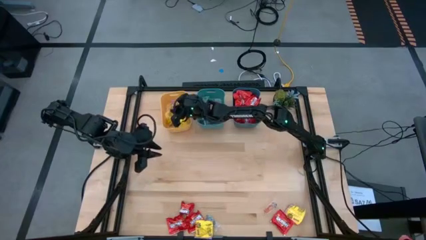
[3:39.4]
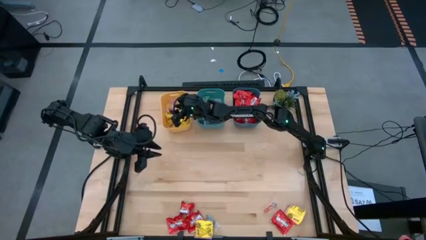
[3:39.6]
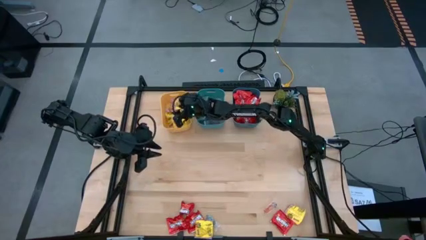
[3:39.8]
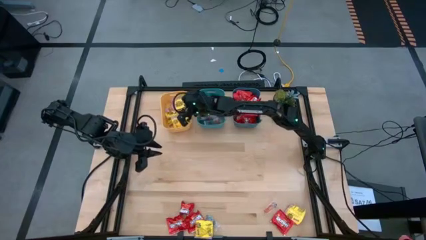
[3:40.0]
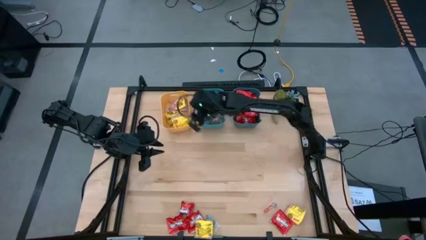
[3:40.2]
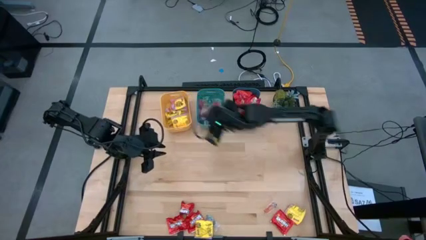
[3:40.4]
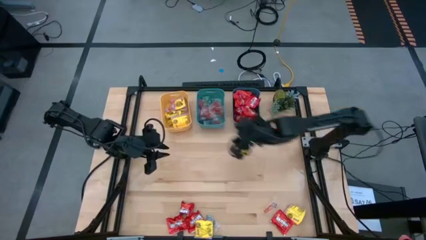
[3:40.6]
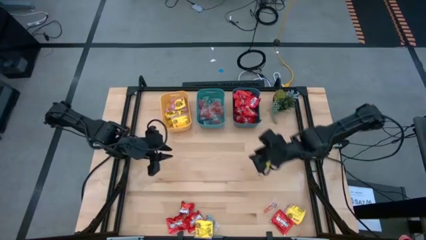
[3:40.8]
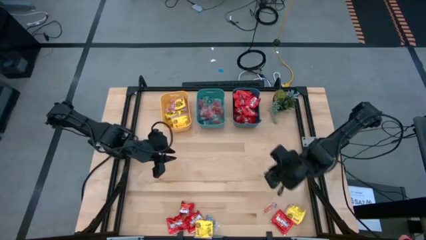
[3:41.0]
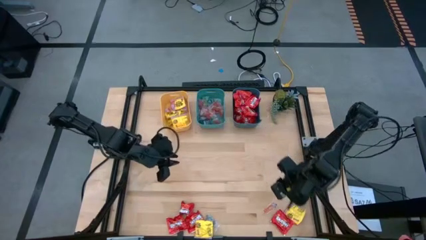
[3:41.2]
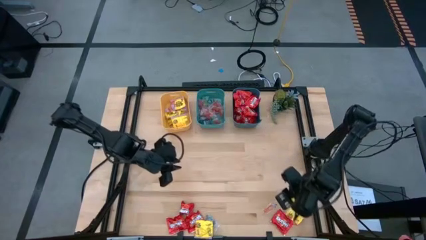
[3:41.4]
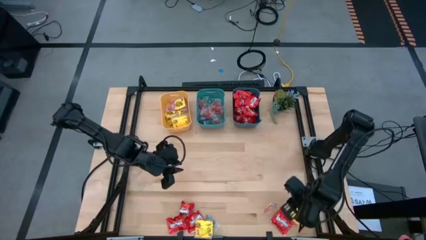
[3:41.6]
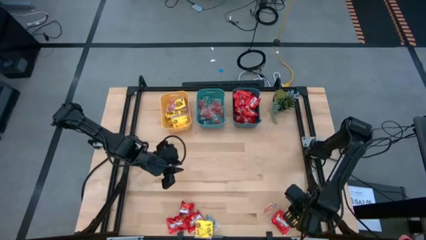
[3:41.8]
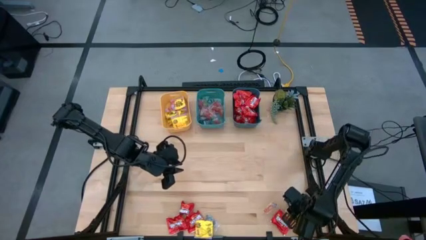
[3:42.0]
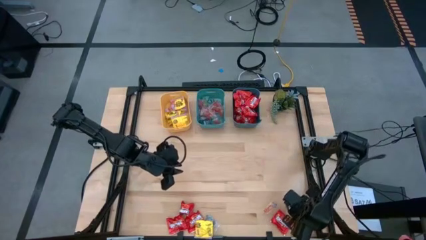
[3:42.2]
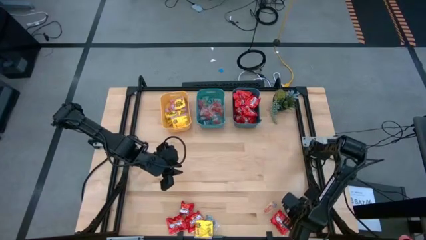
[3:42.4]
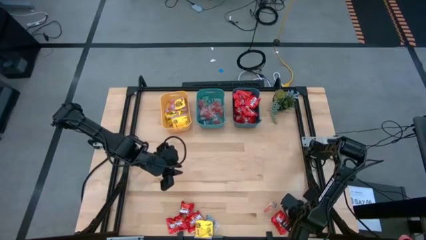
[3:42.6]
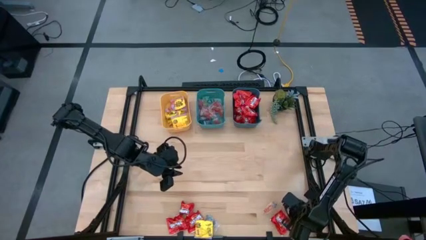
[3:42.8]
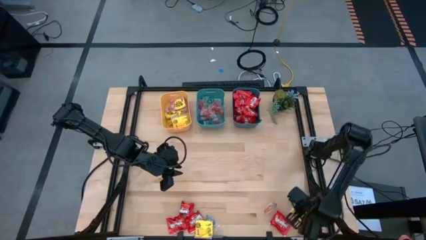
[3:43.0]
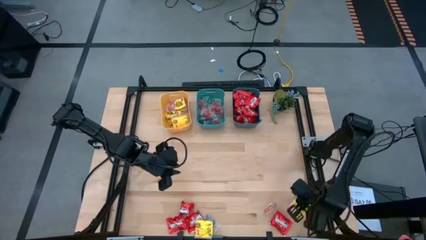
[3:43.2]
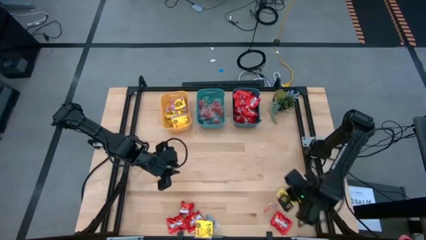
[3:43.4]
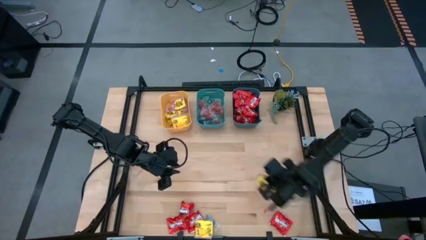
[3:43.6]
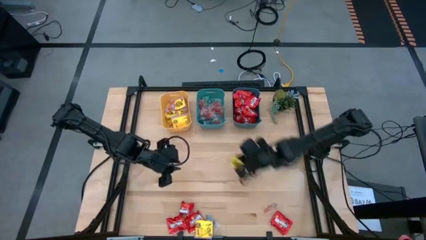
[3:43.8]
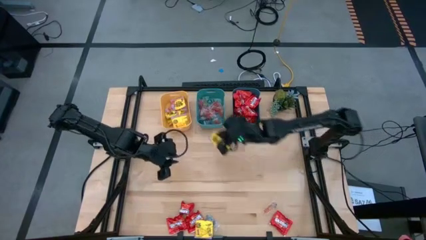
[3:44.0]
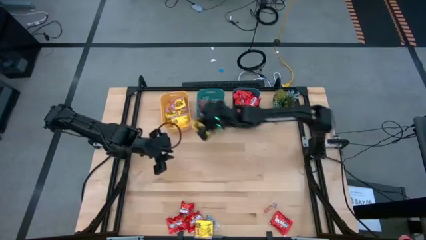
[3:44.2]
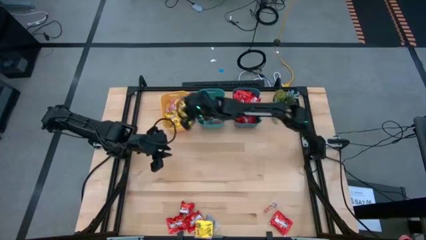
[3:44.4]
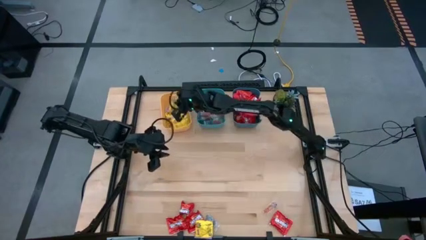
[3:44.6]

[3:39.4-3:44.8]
Task: Sort candy
Put the yellow candy into the yellow bin

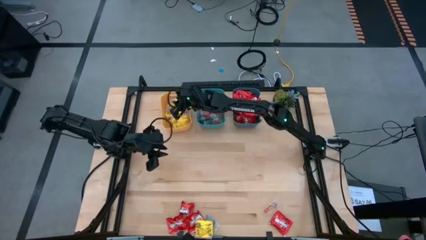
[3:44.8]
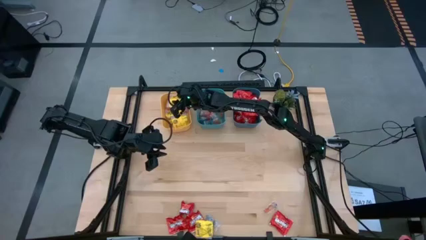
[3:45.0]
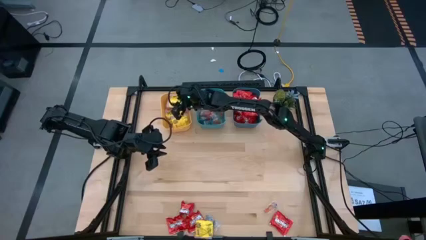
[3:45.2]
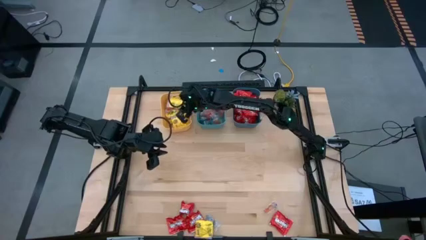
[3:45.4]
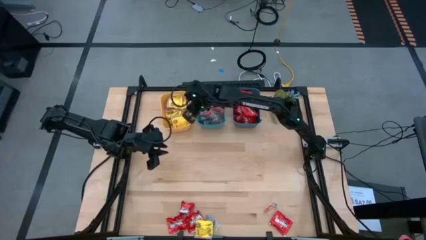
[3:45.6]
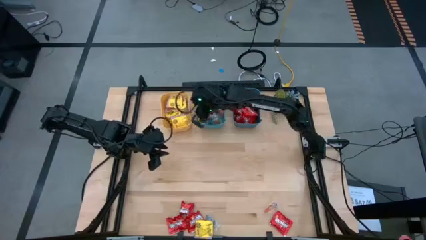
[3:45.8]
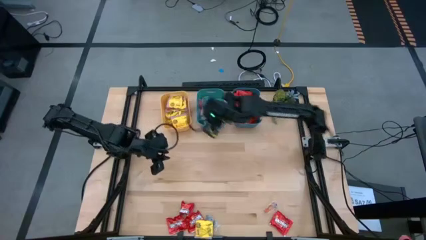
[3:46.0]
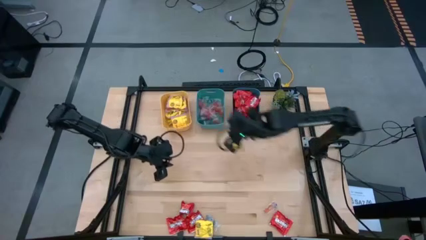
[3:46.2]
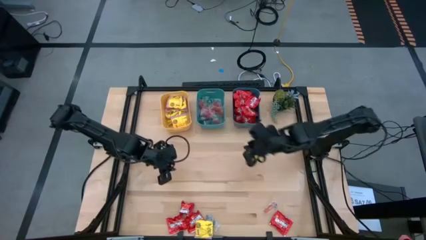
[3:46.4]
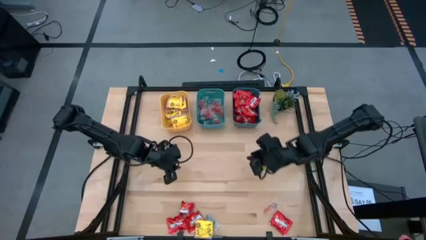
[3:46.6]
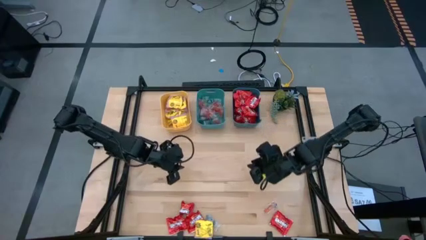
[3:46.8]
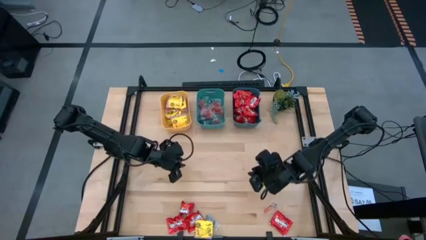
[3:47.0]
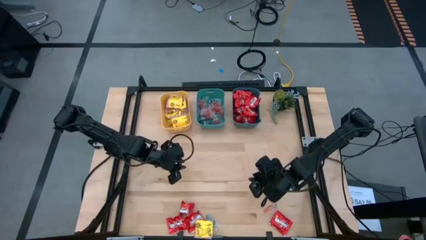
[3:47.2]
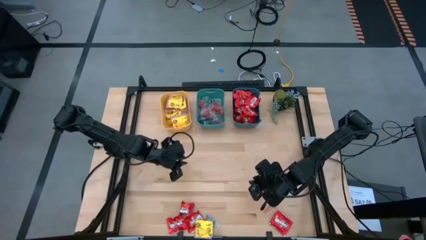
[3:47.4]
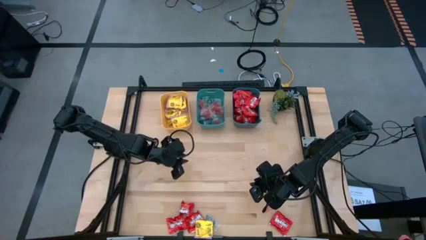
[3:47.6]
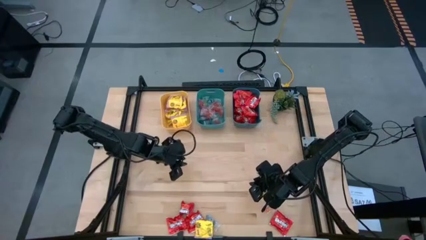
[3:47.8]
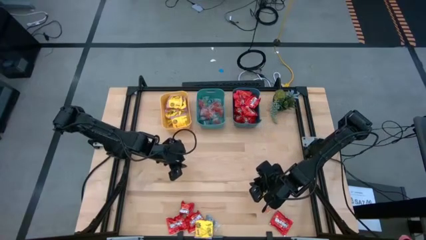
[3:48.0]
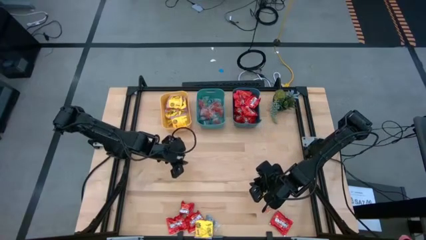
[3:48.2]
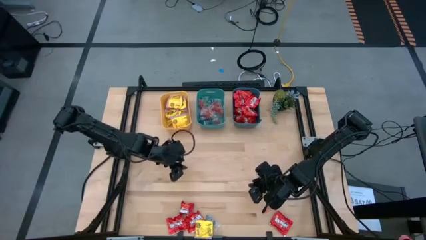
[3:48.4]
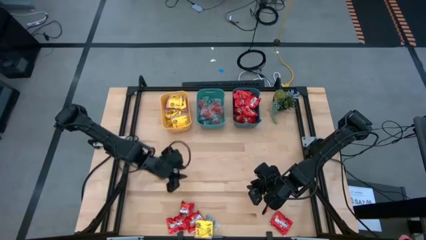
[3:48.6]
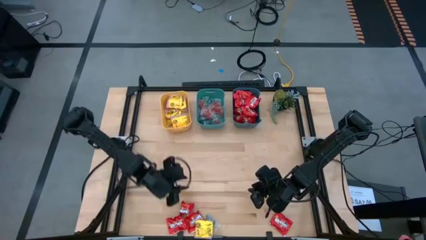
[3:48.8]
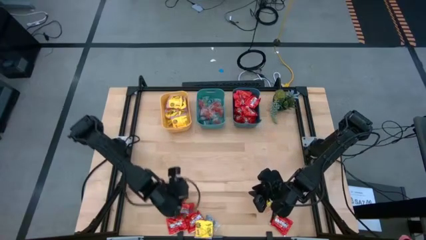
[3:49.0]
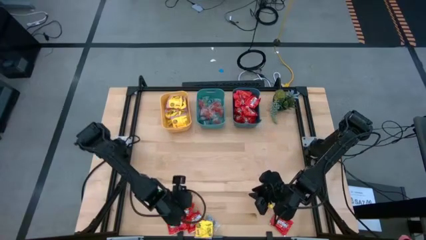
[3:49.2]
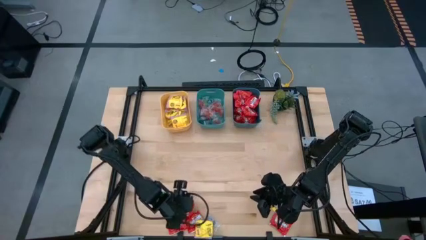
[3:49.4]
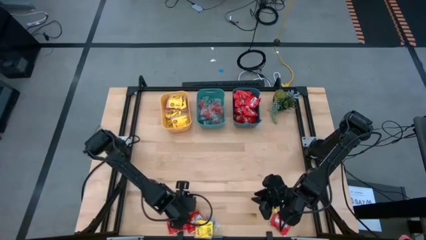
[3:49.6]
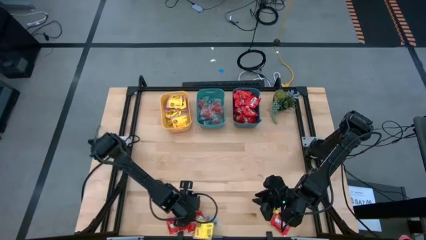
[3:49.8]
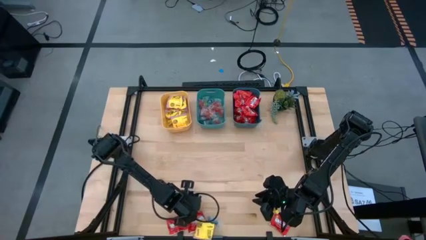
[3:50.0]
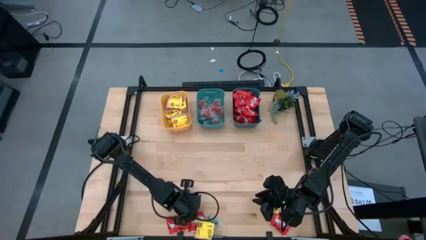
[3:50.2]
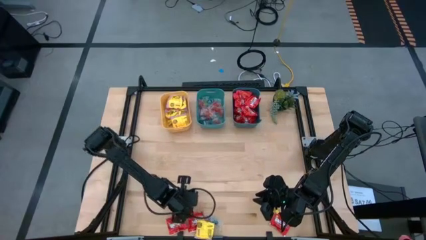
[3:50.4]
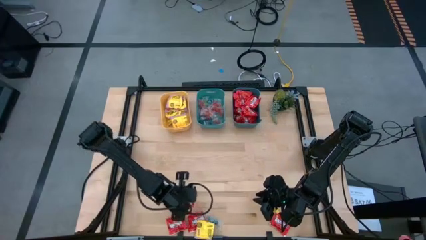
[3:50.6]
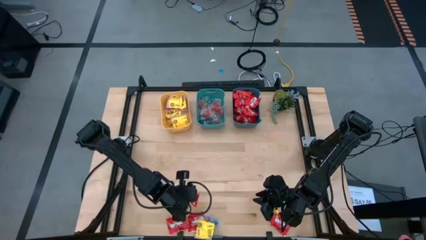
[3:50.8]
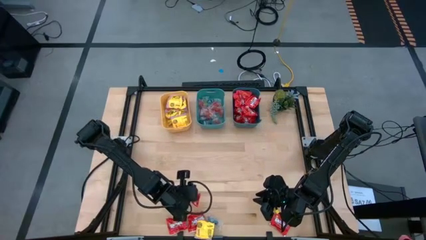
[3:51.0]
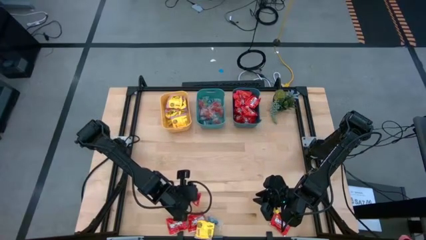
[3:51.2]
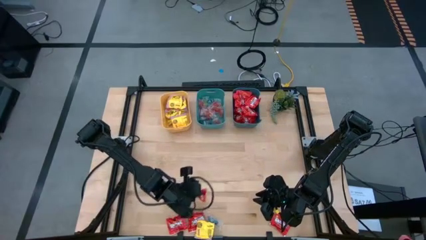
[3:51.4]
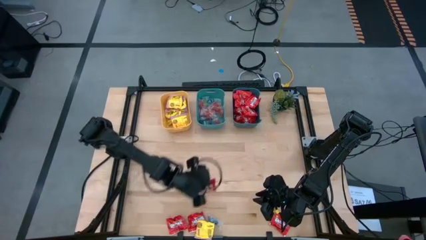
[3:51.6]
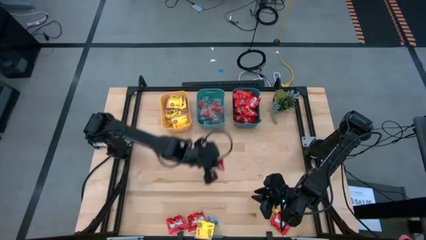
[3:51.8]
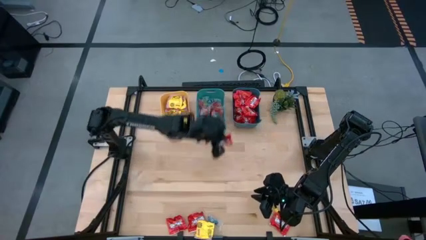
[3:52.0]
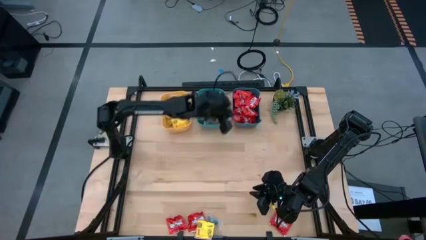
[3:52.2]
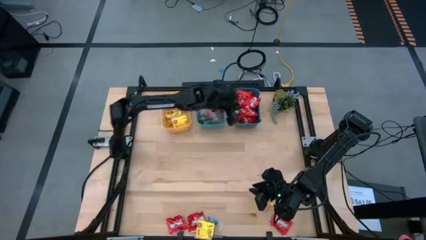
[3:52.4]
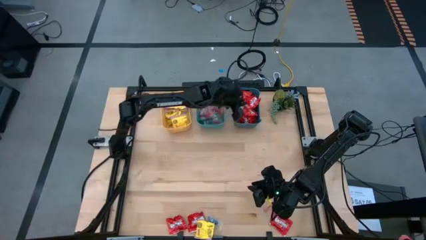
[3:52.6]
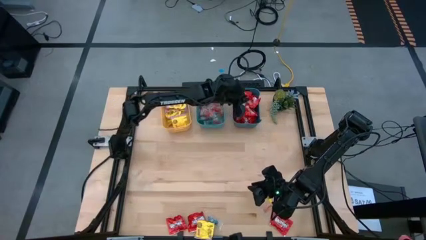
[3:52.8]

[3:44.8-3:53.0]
Put the red candy into the blue bin

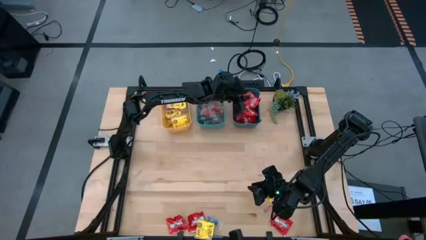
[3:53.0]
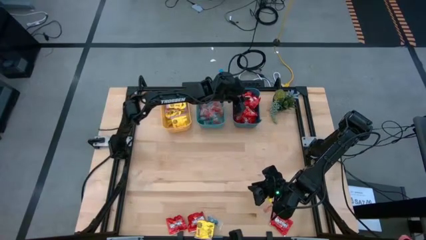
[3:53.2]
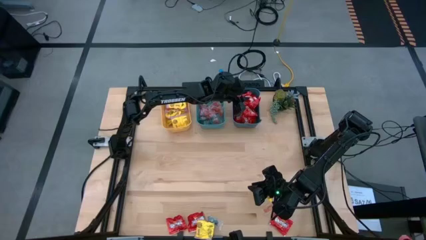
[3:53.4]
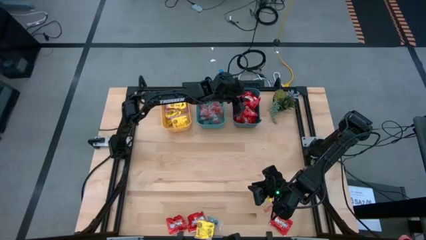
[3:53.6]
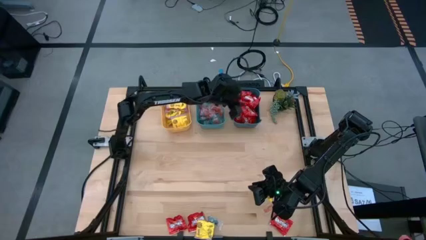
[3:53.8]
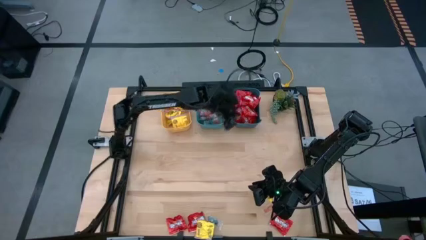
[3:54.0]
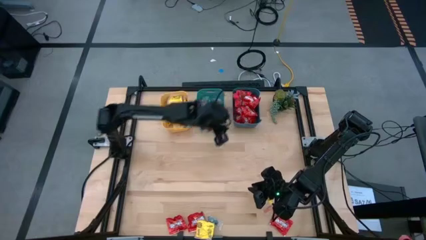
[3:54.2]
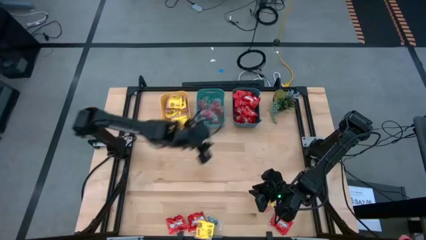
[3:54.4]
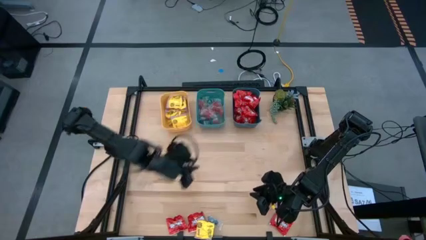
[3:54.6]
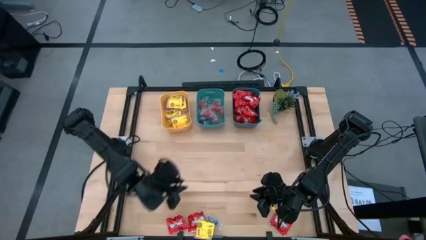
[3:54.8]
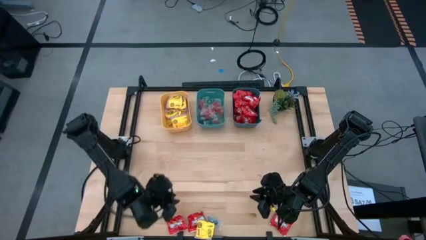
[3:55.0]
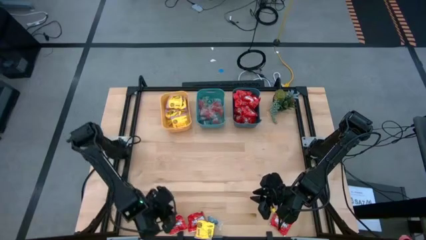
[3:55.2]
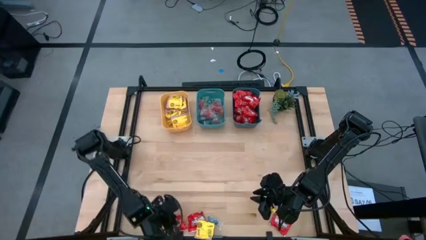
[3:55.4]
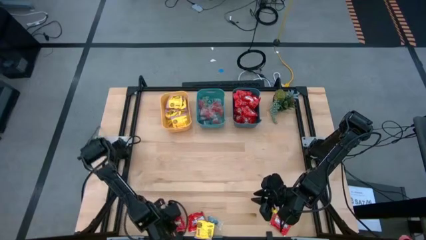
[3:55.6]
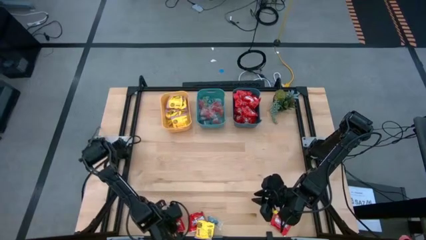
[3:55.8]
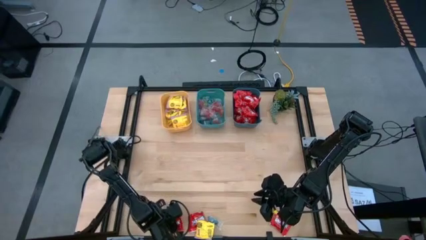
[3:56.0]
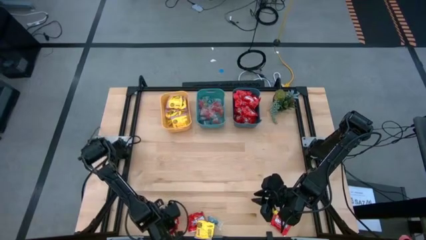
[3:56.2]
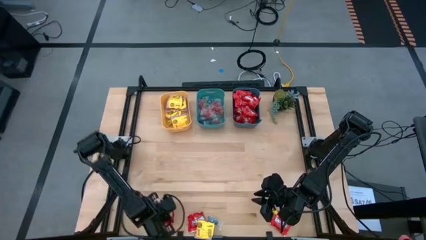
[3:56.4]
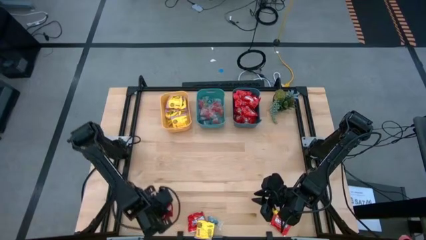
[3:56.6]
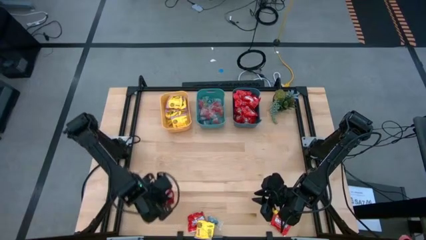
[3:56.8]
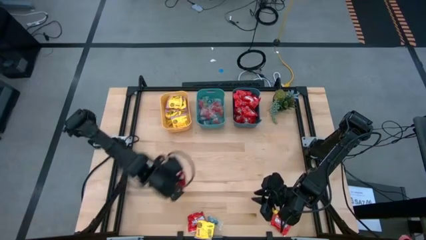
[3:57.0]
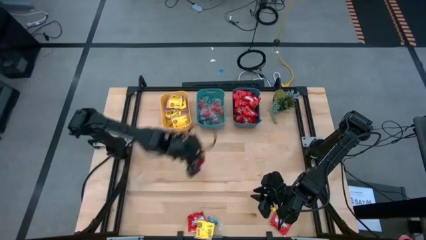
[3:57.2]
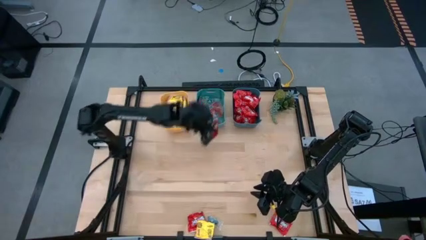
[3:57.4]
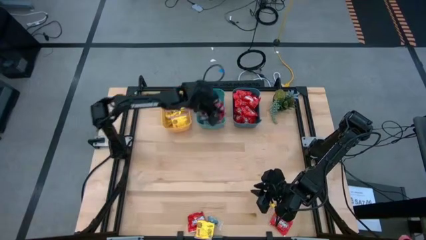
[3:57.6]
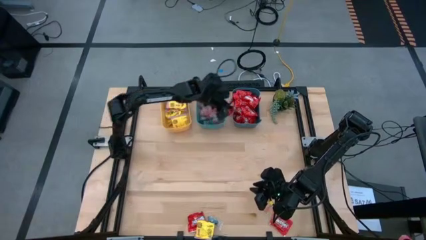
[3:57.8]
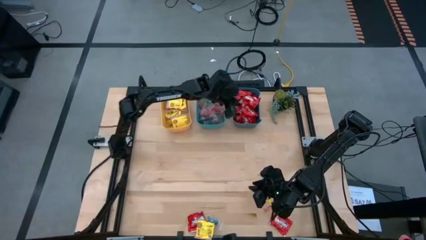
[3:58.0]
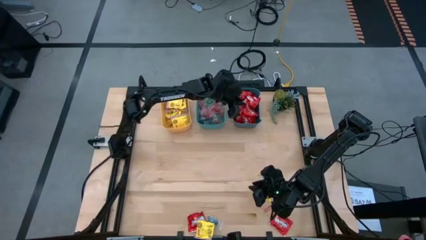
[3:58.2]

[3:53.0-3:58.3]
Put the red candy into the blue bin
